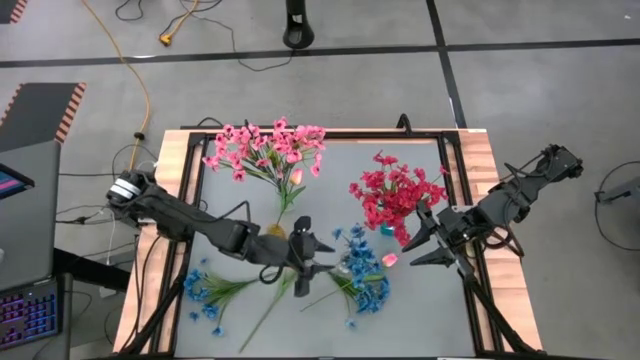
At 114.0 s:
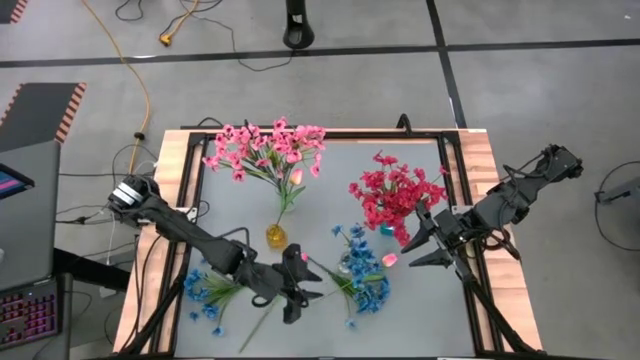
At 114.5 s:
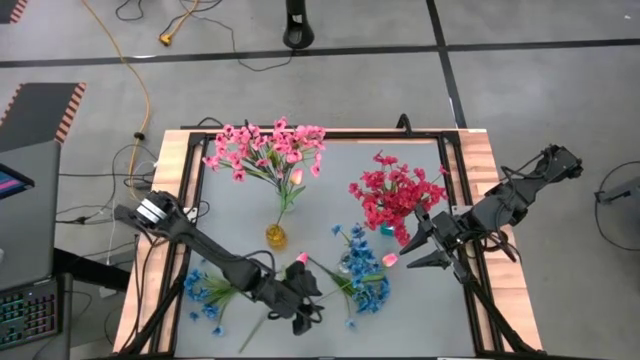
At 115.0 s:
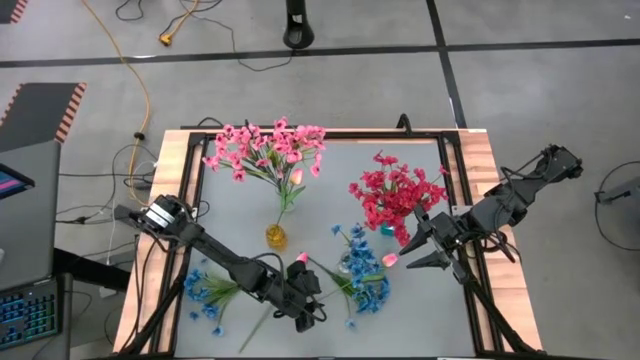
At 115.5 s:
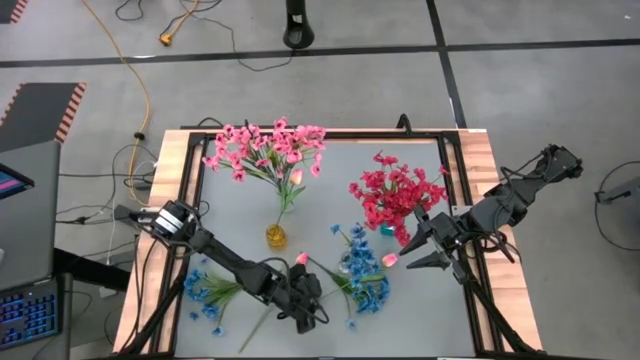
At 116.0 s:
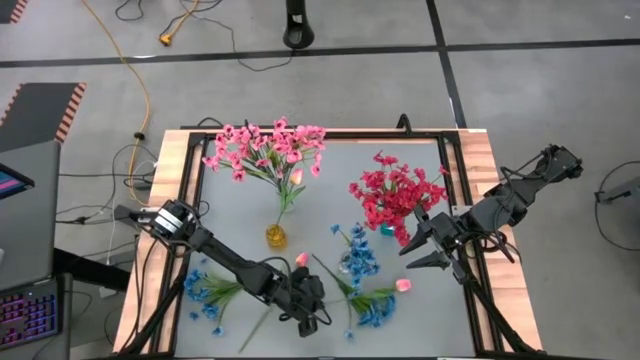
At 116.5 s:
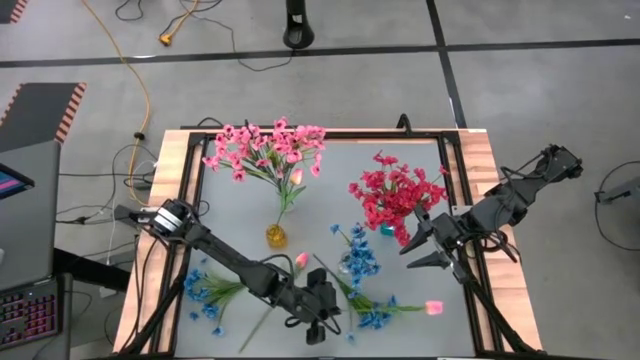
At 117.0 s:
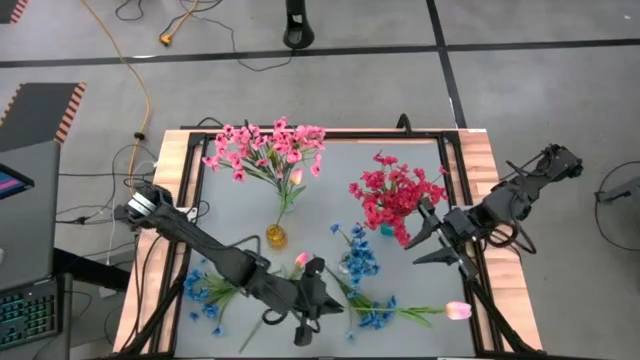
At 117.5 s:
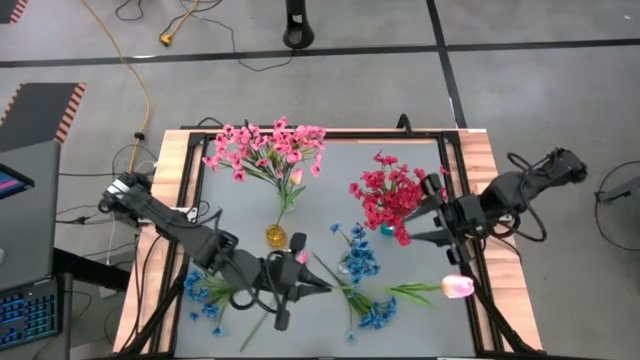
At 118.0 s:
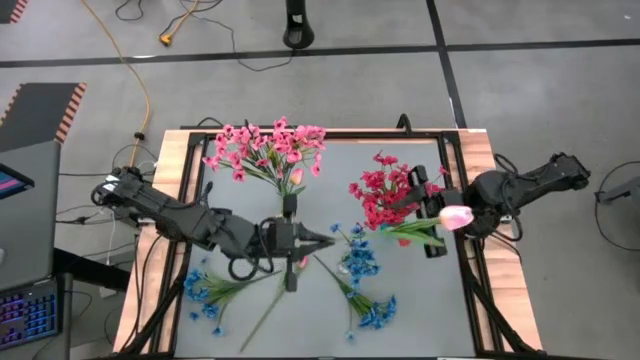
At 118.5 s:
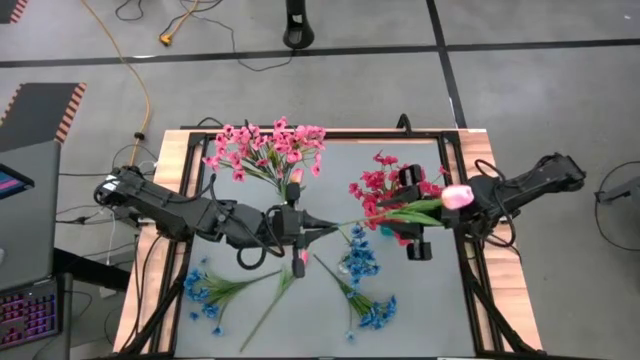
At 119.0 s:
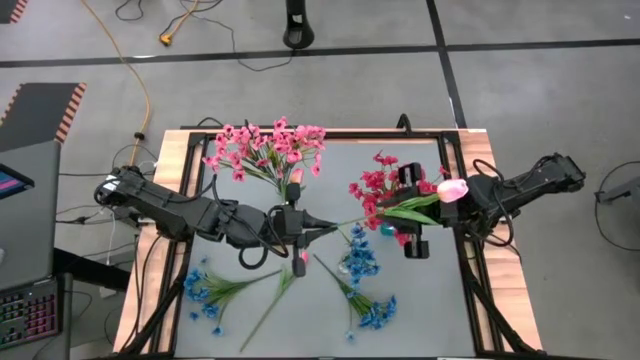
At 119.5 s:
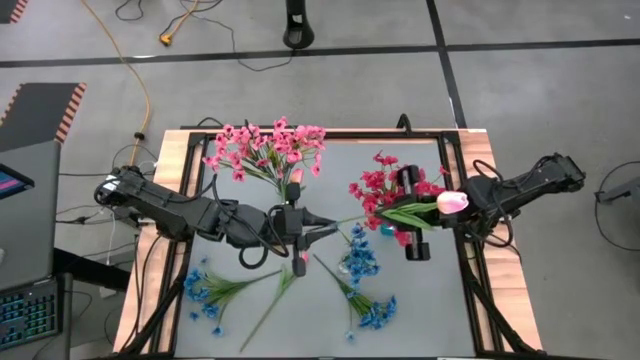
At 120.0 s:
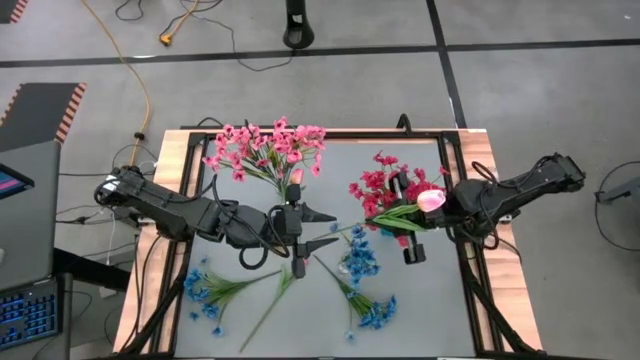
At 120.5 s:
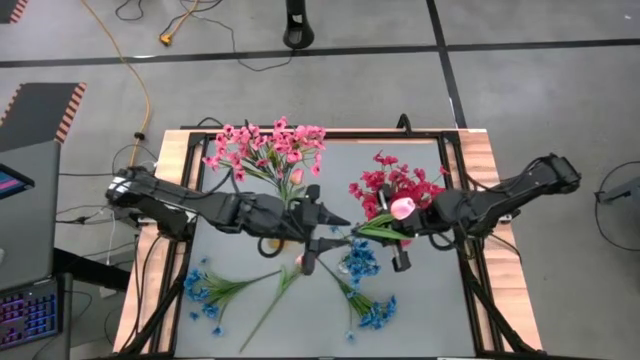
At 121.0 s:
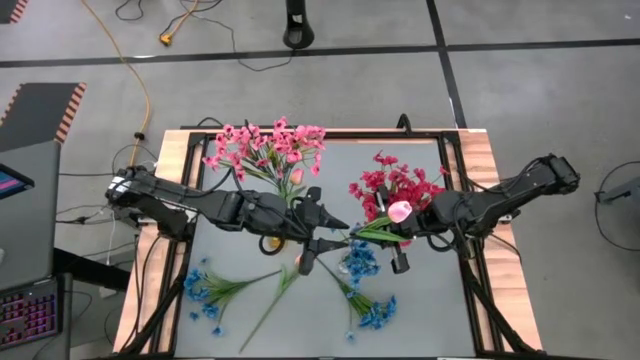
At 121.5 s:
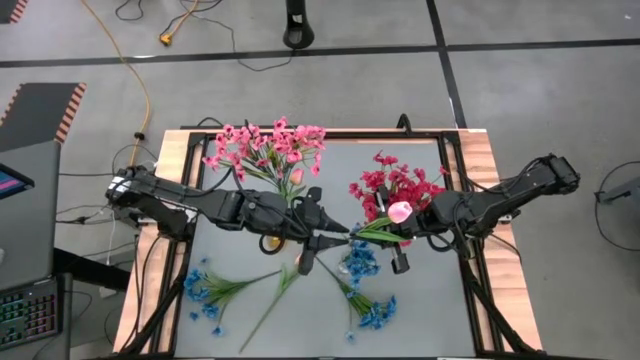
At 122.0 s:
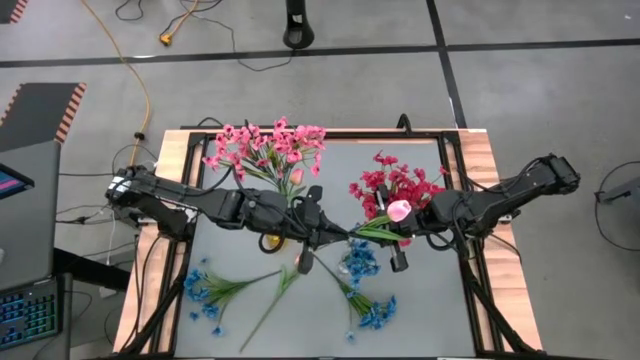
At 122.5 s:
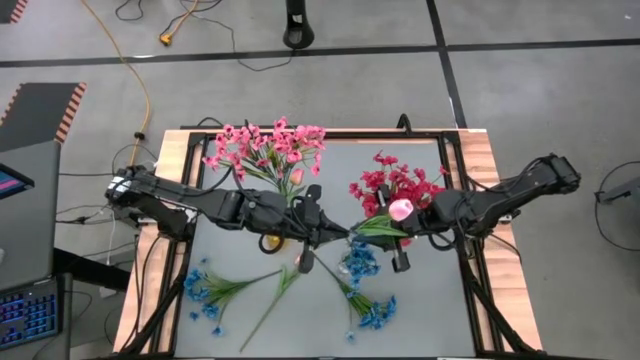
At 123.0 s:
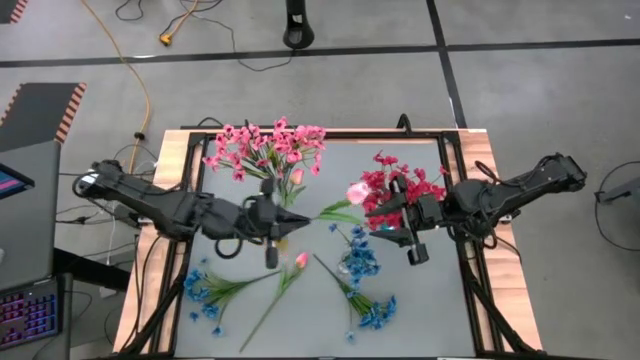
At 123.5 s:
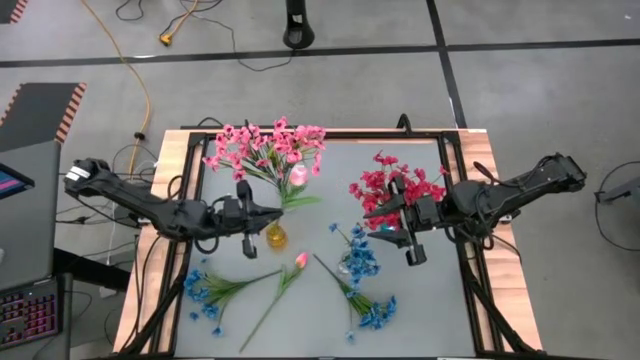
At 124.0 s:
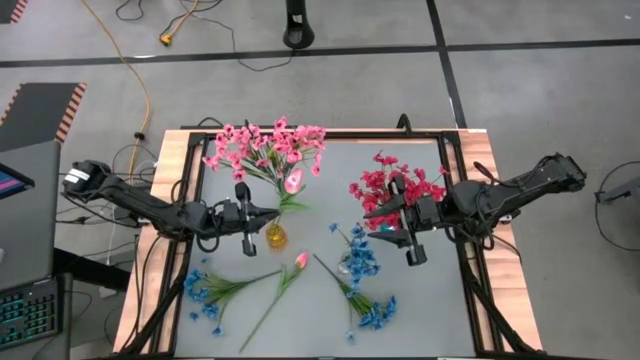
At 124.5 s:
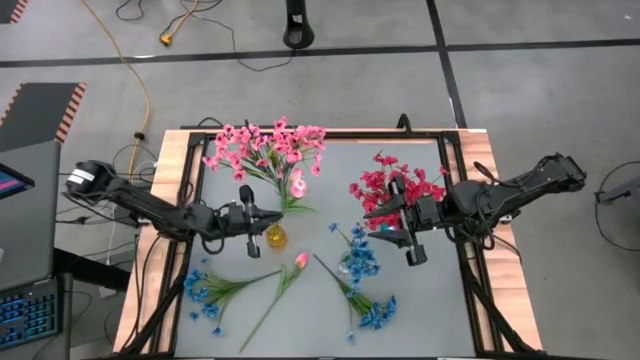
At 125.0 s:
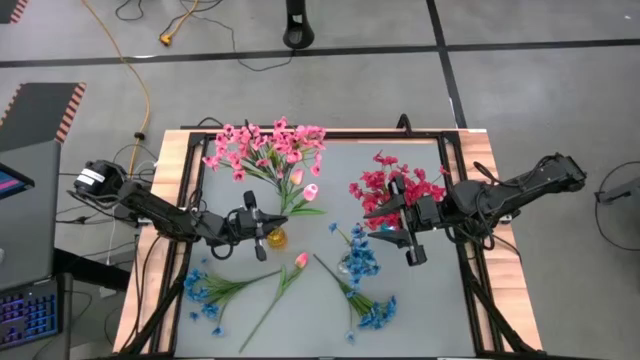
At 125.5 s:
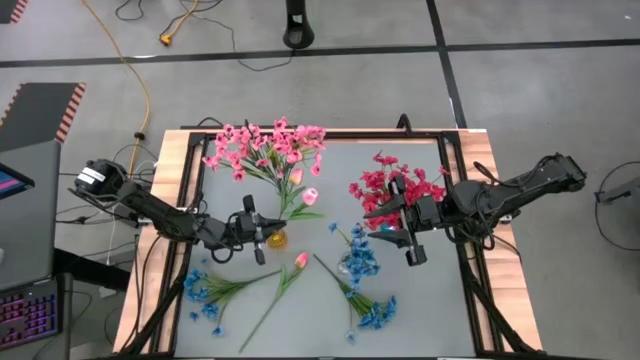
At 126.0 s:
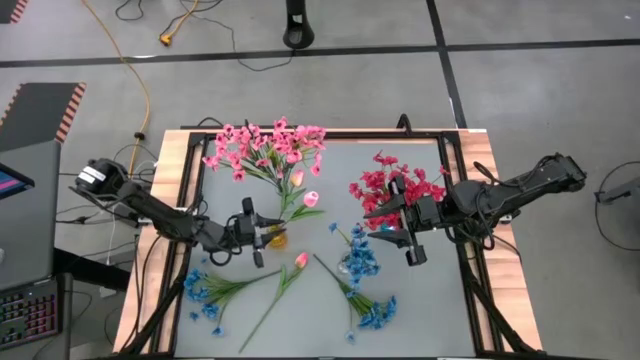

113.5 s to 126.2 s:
Task: Sort flowers into vase by color
Put the right pink tulip into the yellow vase

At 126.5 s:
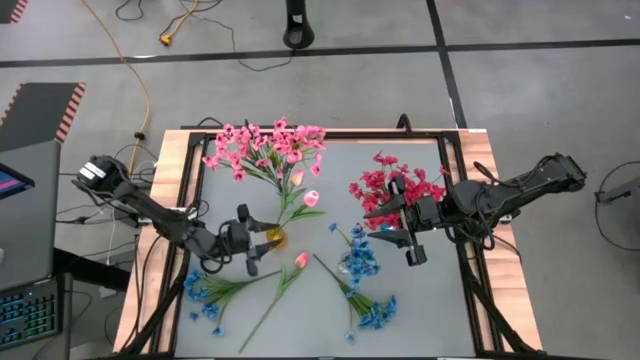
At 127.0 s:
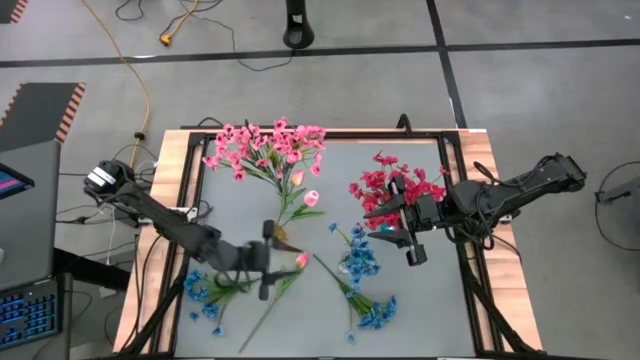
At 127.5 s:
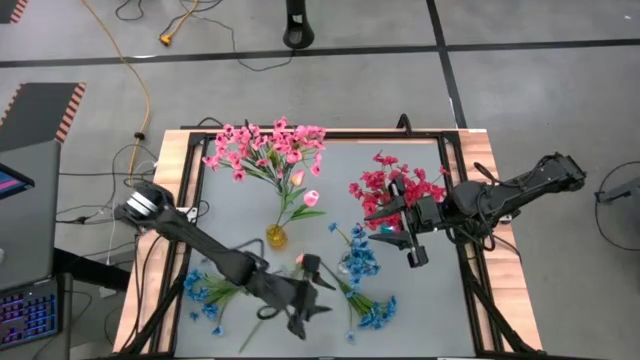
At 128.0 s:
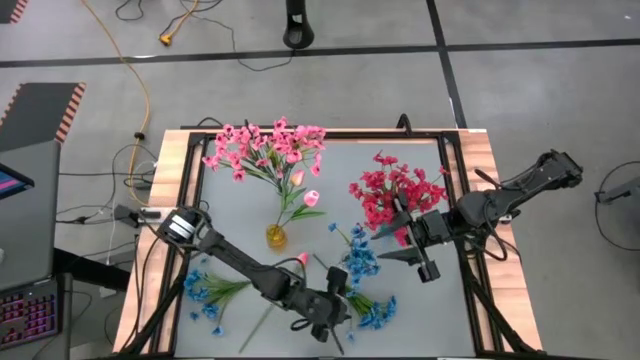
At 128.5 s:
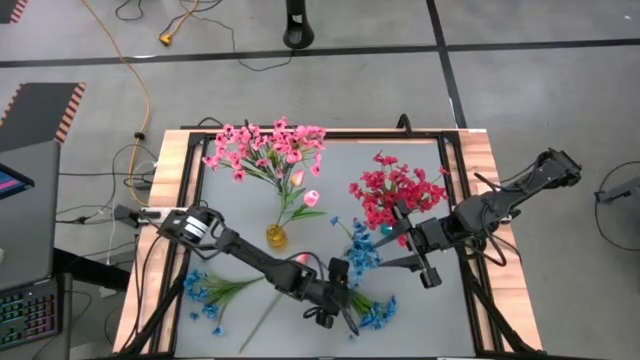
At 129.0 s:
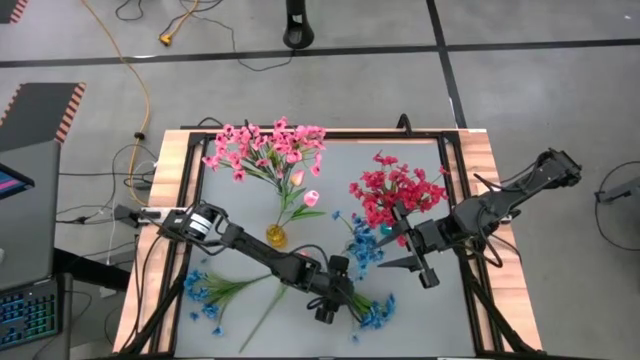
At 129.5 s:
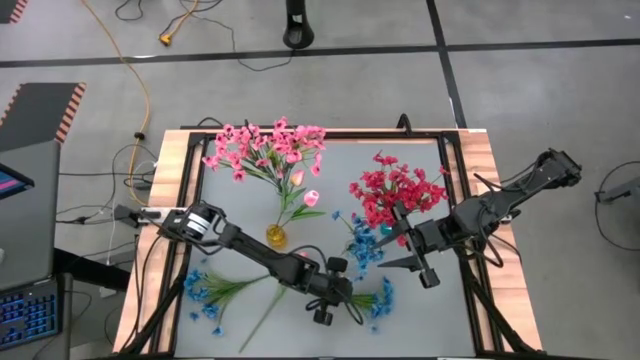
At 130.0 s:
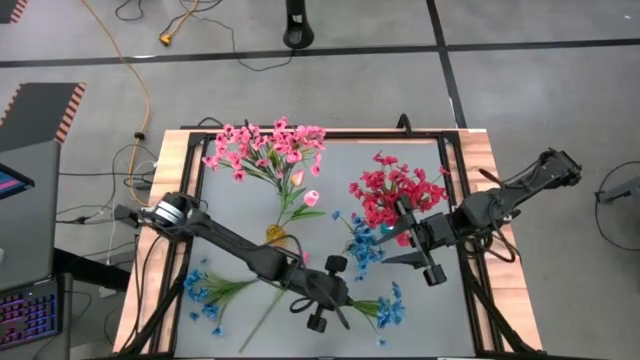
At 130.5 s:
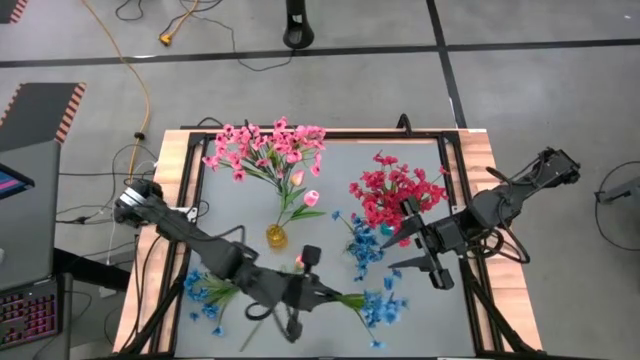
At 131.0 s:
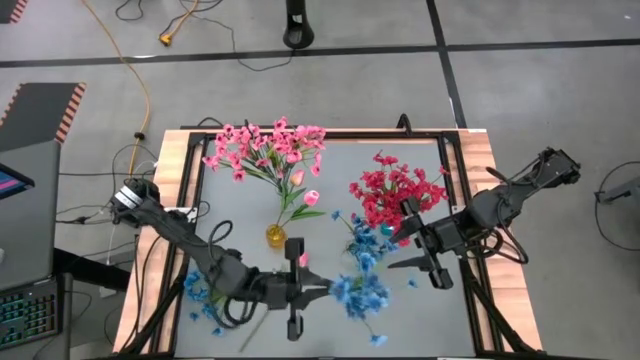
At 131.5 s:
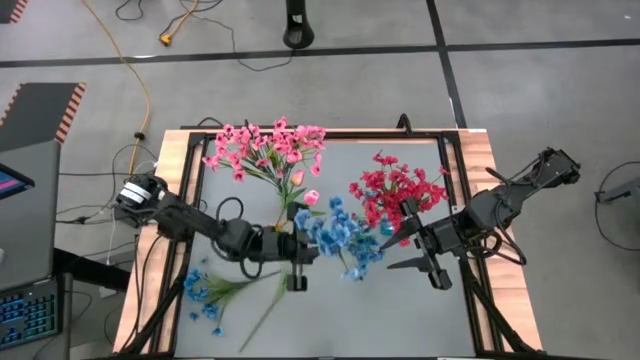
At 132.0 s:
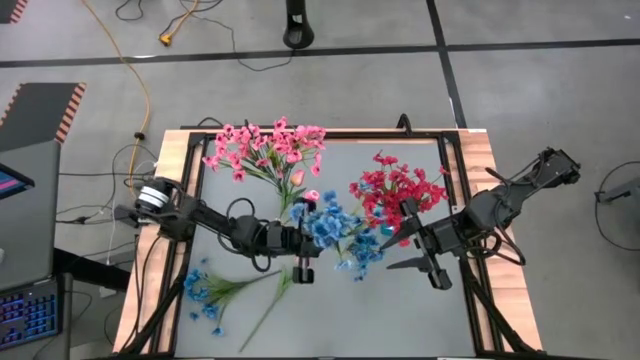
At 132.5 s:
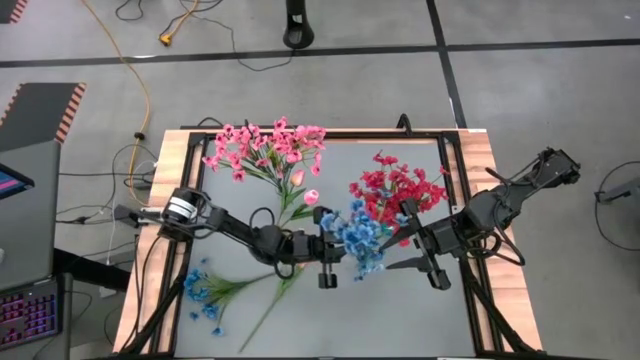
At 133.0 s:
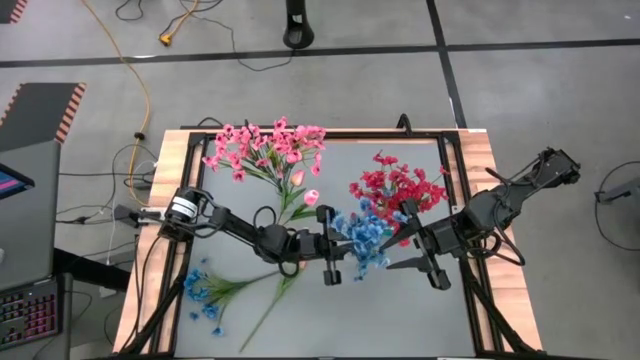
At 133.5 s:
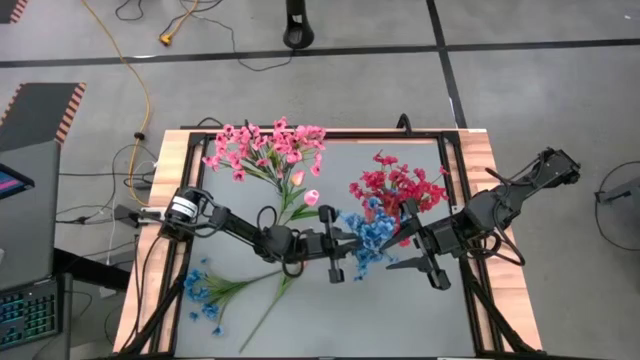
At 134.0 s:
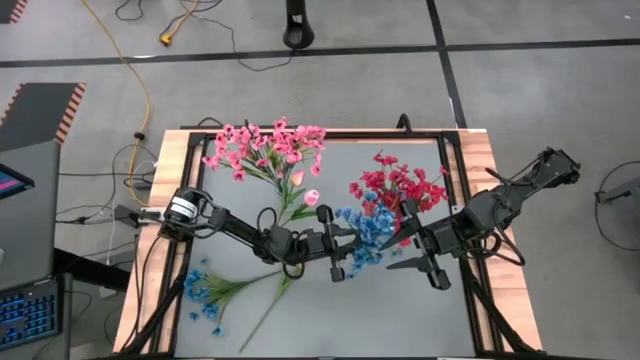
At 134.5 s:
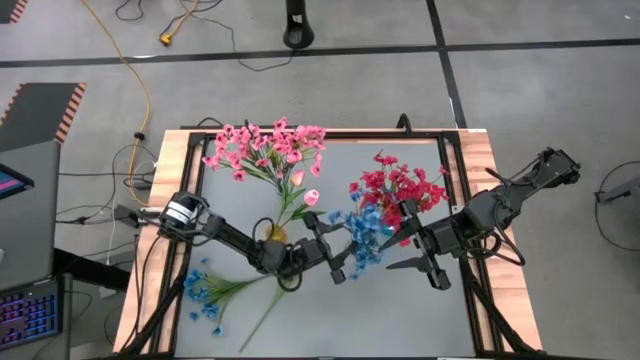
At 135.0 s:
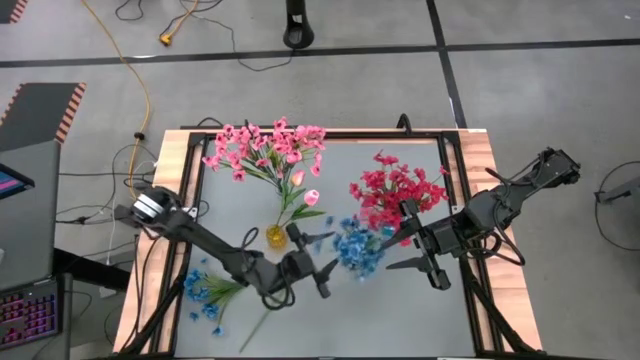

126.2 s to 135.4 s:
Put the right blue flowers into the bottom transparent vase

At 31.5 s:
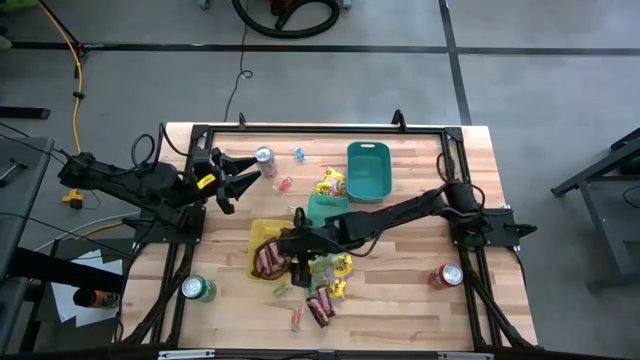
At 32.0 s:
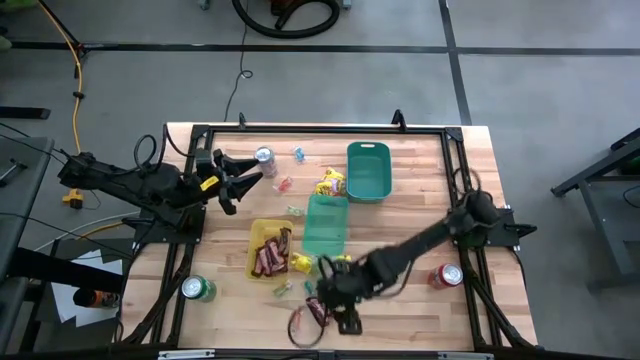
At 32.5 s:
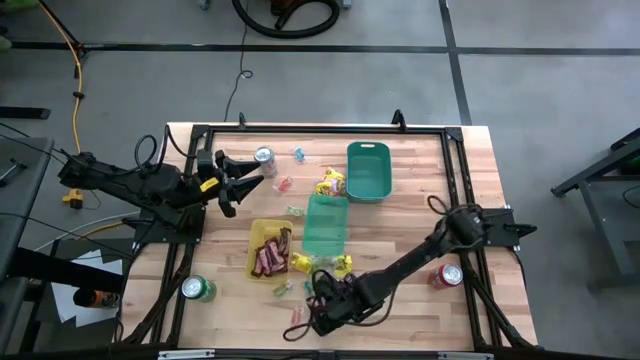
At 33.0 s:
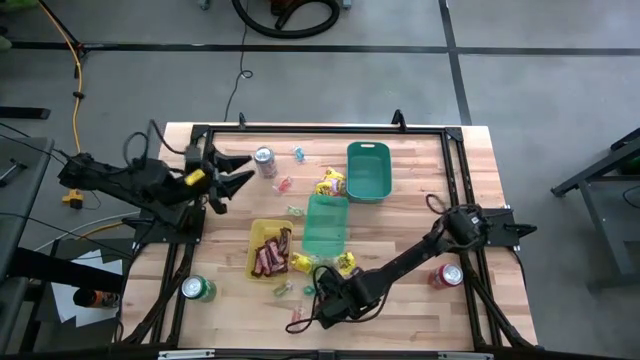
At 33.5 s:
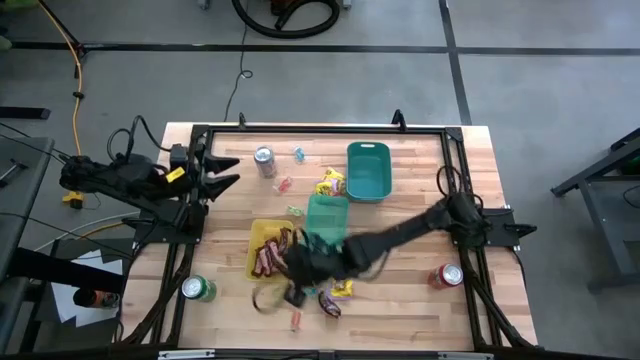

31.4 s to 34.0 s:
Task: Sort candy
Put the brown chocolate bar into the yellow bin
